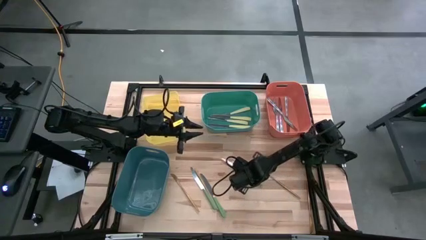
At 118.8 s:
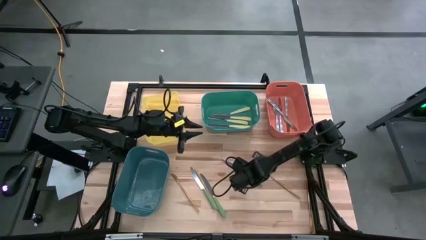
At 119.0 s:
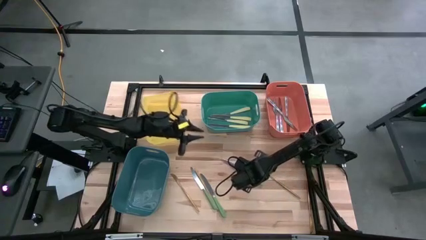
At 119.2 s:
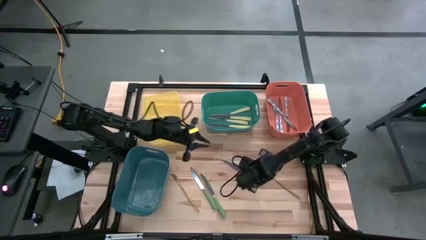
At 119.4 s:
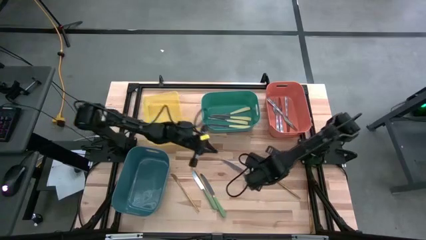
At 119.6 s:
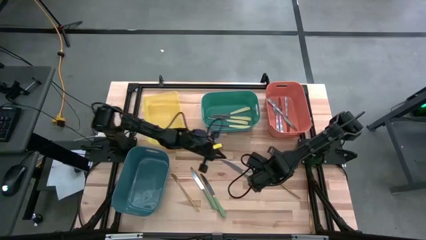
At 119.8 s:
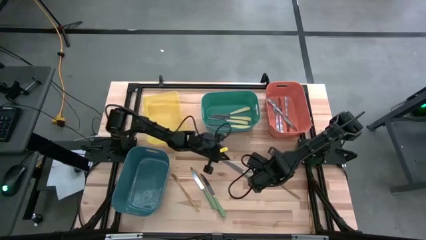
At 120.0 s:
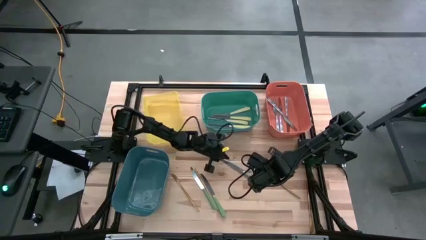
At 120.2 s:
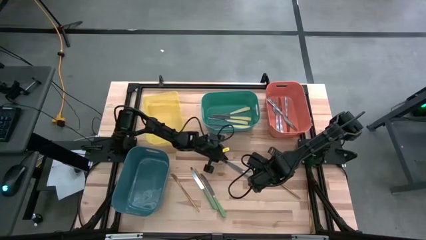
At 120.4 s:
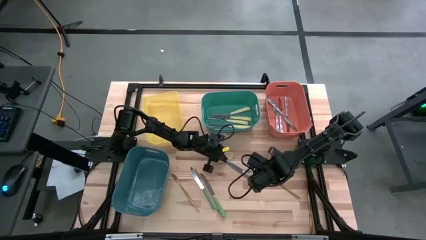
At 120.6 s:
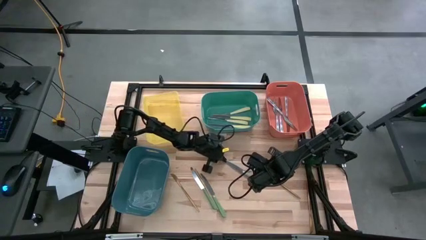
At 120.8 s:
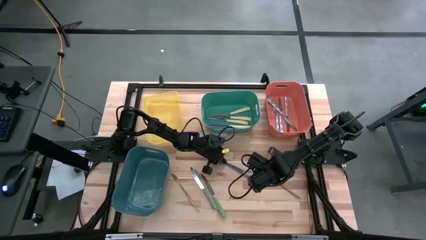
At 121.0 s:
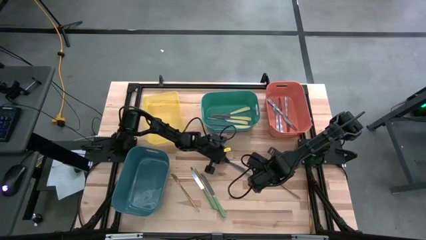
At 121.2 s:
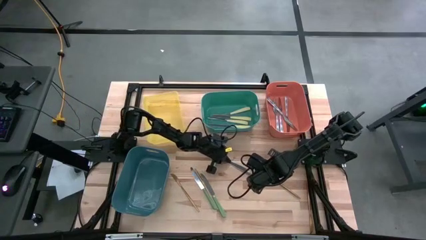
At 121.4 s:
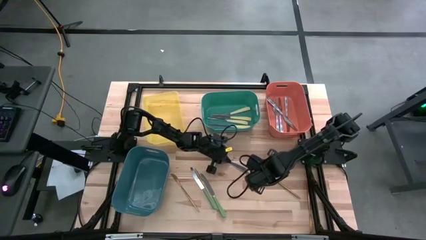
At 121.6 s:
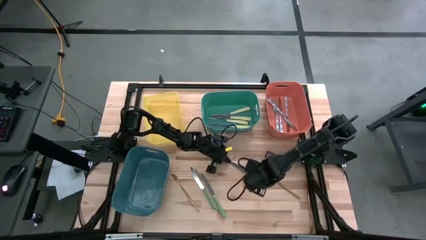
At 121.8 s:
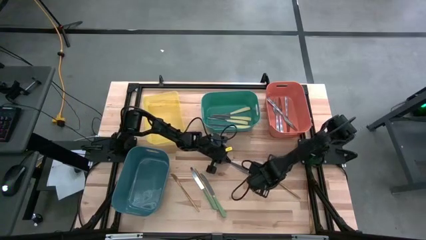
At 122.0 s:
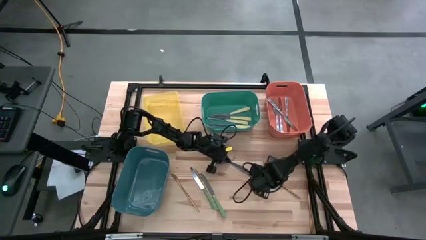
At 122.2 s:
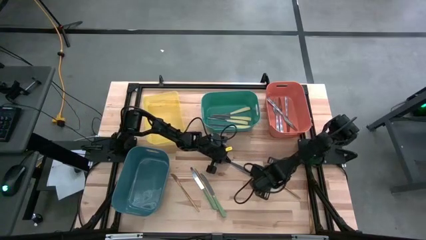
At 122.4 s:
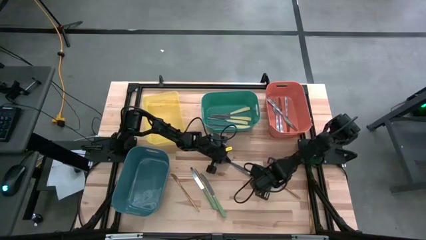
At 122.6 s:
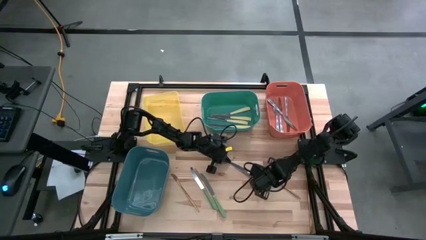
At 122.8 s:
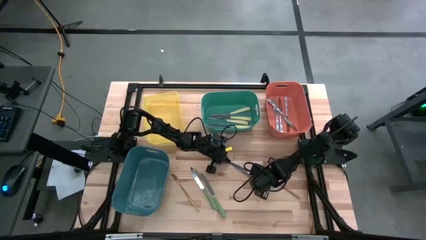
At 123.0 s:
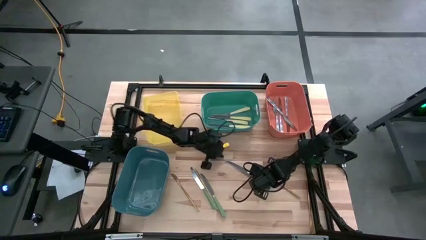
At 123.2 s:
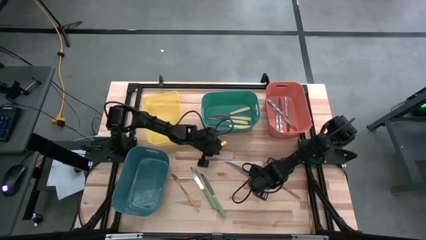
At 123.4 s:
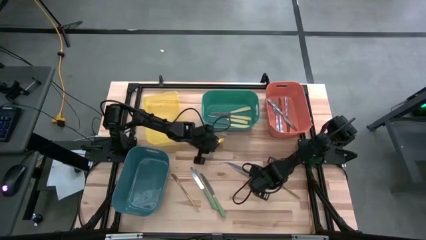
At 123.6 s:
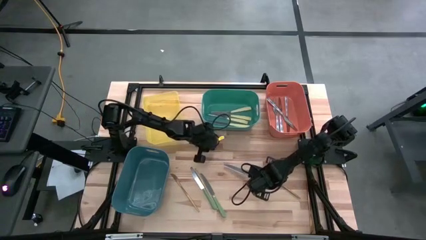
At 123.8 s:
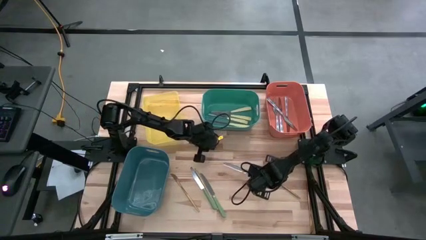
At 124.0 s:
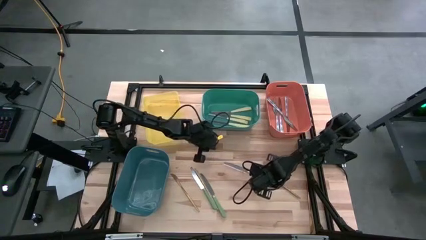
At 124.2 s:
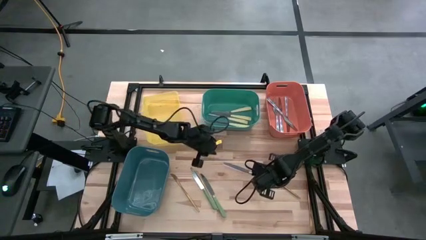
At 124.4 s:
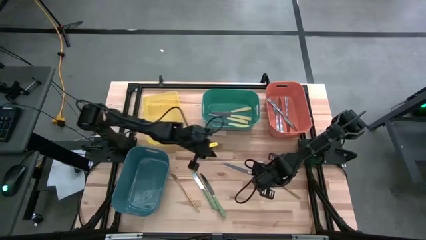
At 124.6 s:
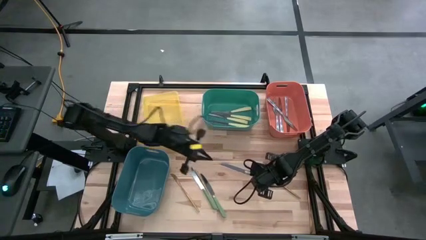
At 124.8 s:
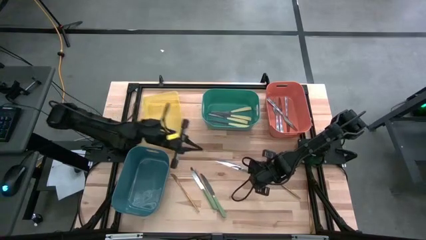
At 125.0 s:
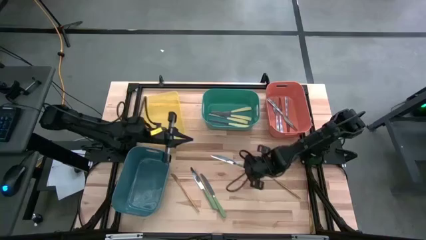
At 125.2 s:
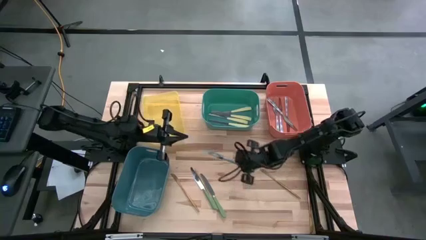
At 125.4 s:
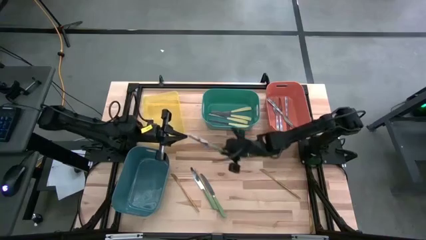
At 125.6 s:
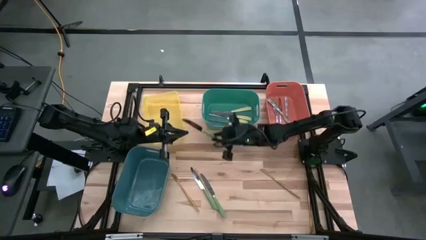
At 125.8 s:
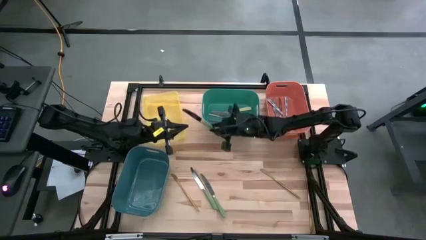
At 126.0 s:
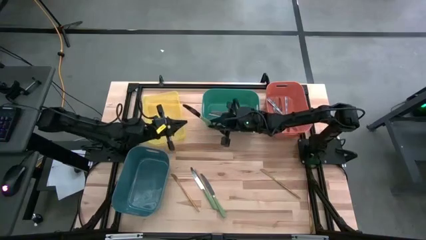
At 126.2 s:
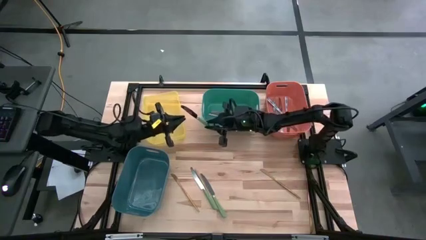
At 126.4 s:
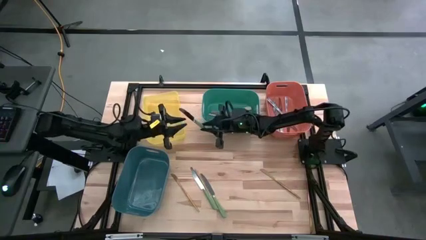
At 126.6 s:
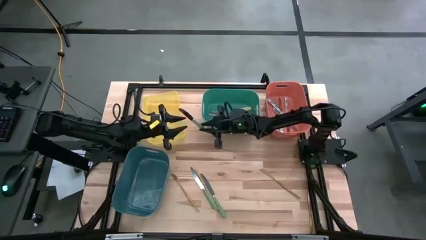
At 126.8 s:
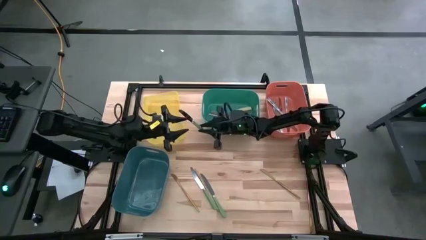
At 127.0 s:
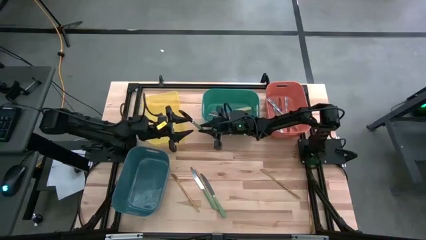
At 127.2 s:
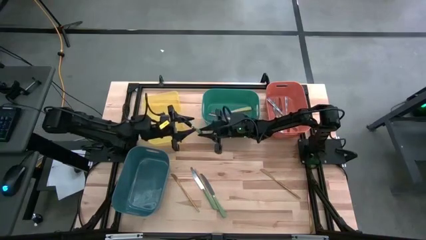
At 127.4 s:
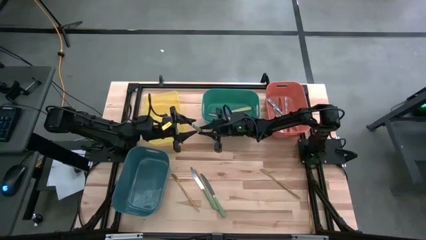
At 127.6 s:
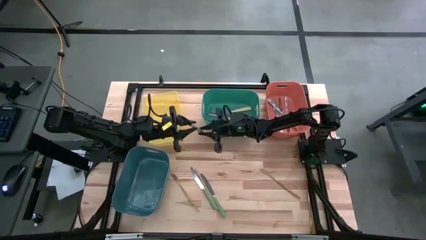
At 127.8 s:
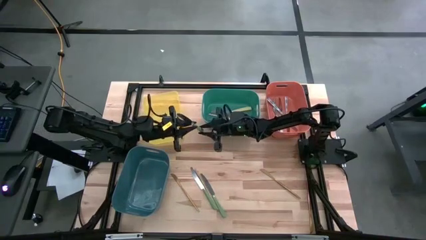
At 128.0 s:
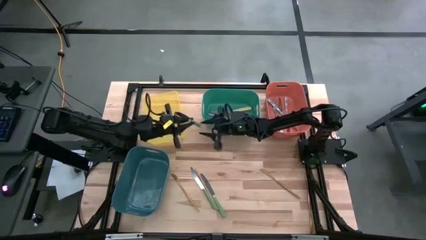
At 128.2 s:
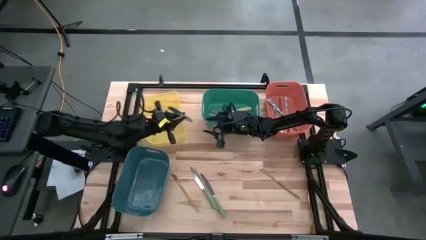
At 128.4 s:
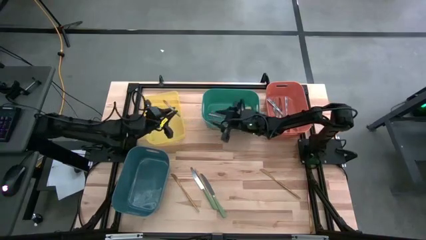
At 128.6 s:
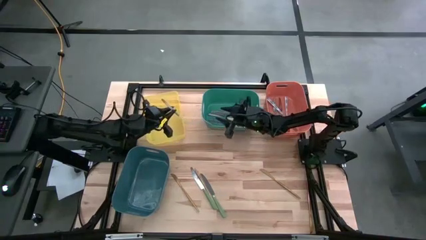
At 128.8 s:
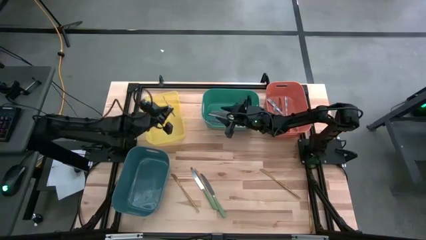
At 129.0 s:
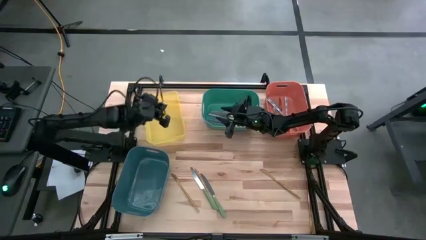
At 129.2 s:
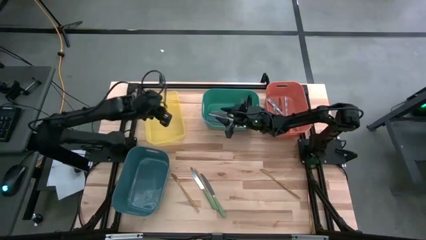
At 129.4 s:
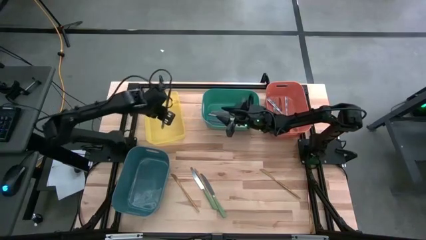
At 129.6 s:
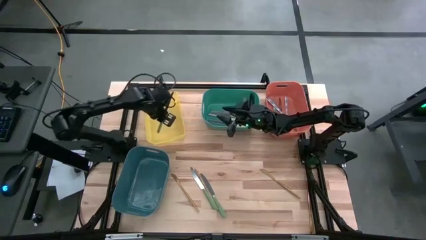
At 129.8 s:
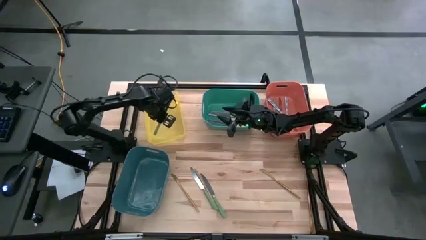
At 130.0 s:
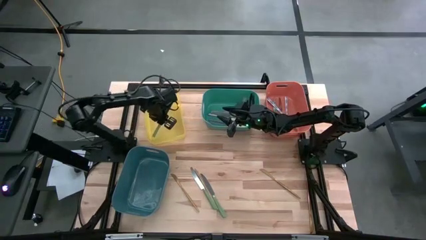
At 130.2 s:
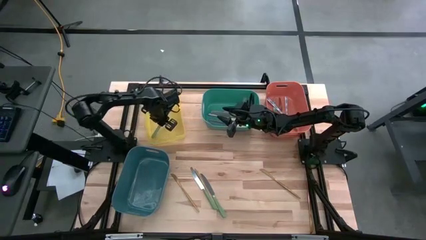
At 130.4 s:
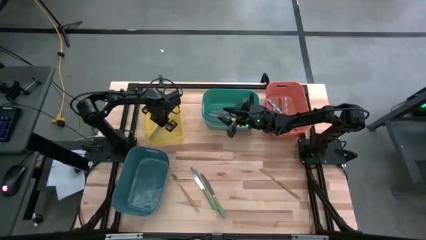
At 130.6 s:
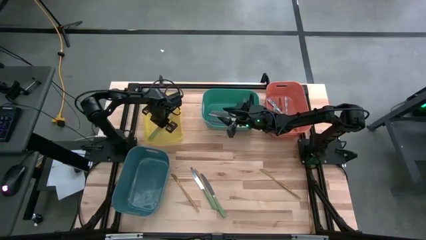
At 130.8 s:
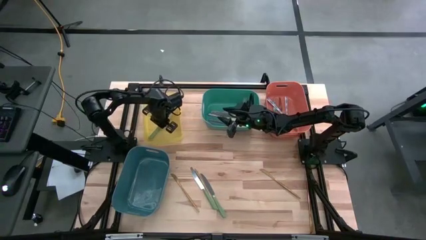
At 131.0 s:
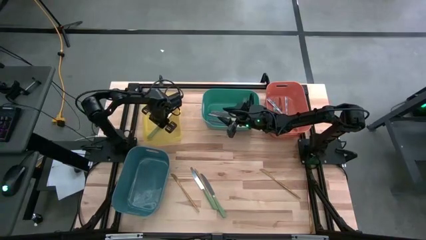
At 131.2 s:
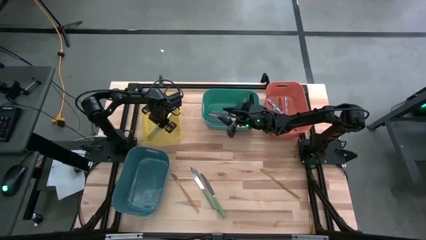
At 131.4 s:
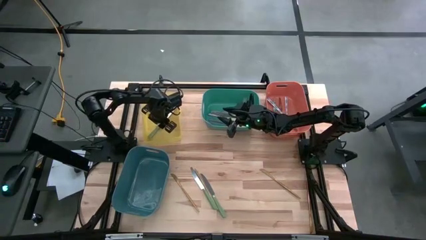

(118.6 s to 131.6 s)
Task: Sort silverware by color (type)
Put the green knife into the yellow bin
